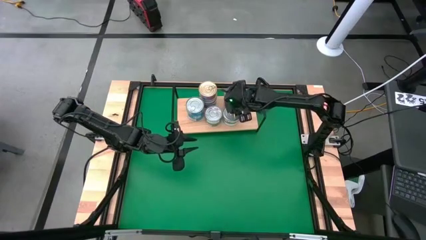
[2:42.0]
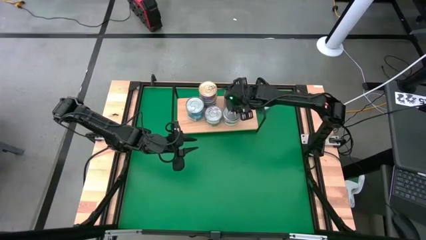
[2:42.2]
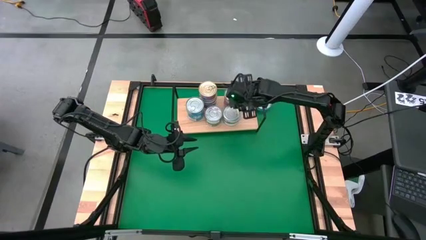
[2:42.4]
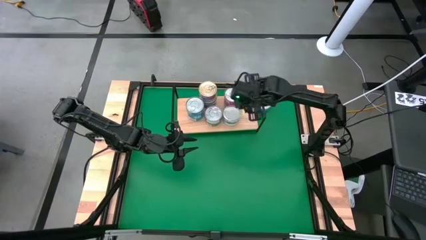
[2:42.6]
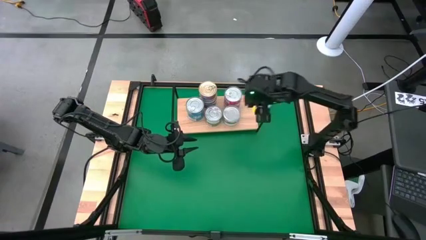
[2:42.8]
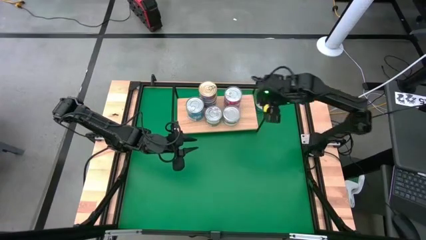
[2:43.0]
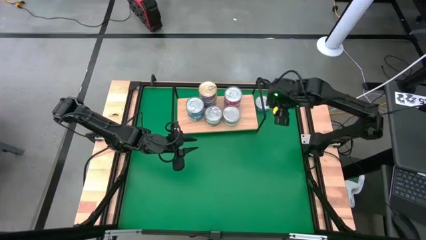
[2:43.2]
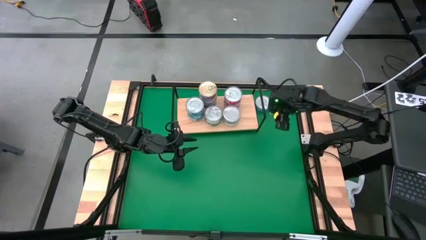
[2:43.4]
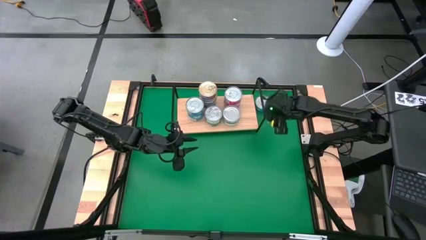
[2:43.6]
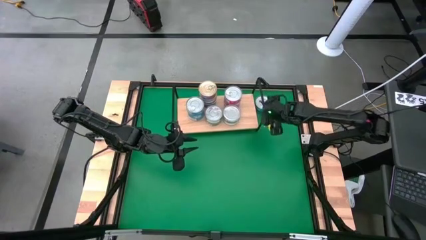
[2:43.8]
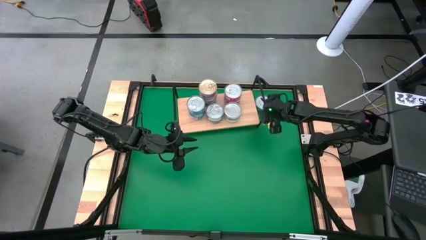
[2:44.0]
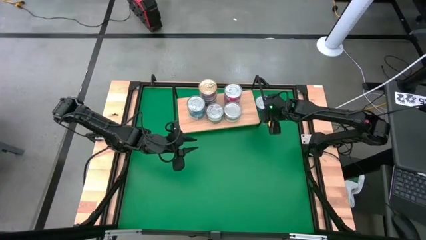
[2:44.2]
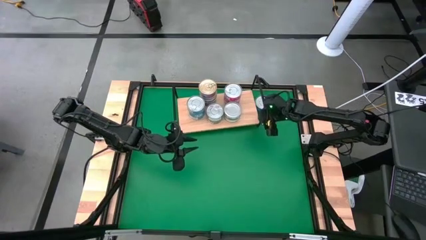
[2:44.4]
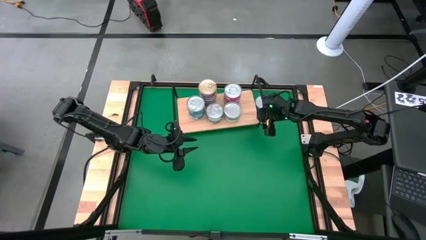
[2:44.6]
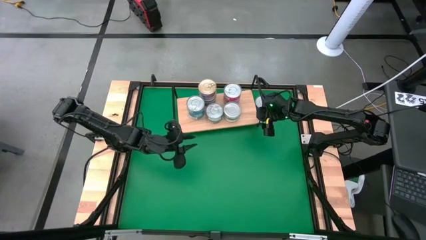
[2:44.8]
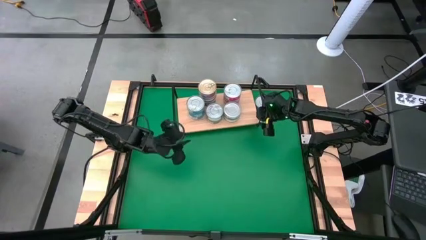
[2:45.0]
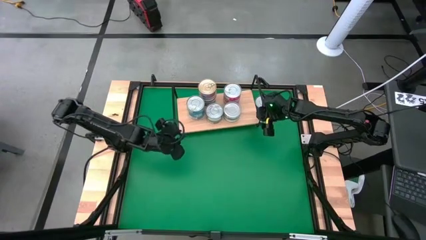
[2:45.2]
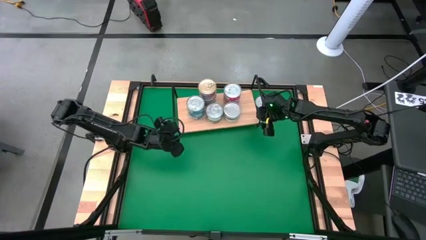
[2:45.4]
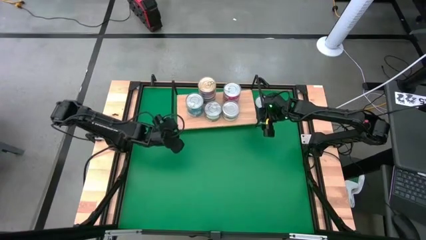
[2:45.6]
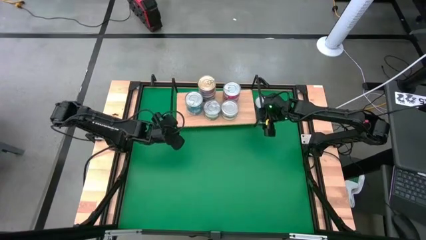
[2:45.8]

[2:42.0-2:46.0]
Task: Stack canned seafood by type on shelf
Adjust the shelf on the table

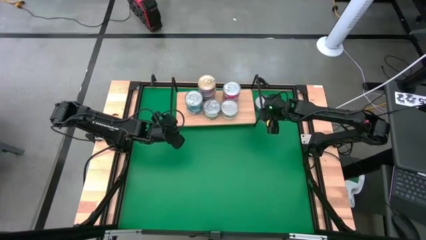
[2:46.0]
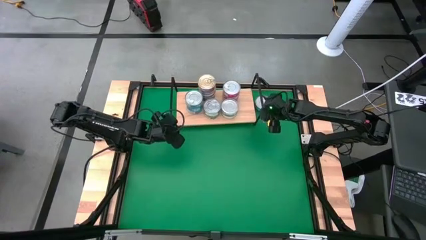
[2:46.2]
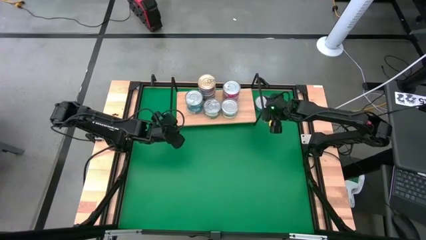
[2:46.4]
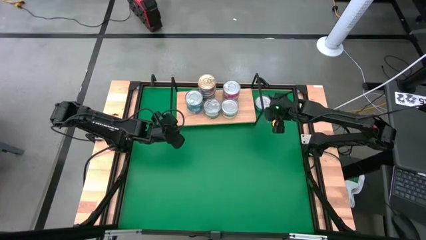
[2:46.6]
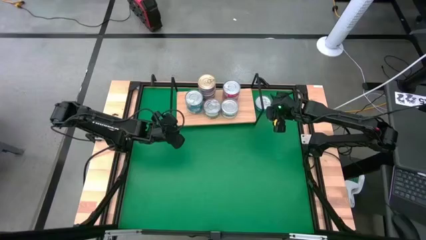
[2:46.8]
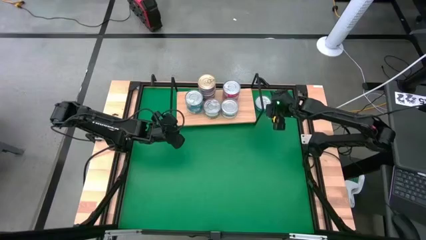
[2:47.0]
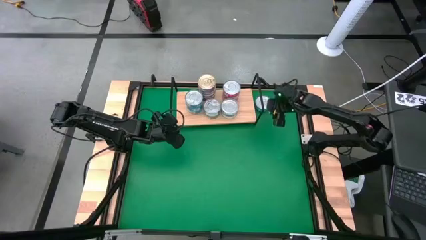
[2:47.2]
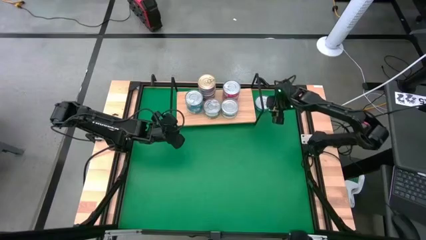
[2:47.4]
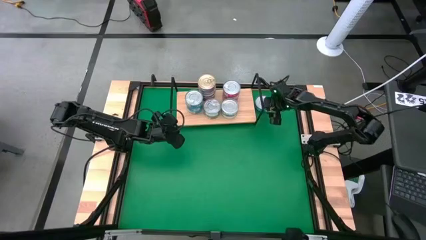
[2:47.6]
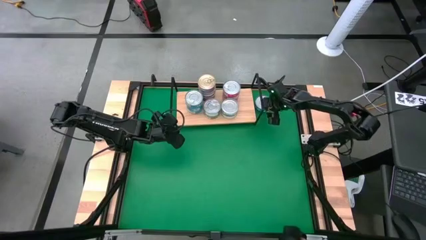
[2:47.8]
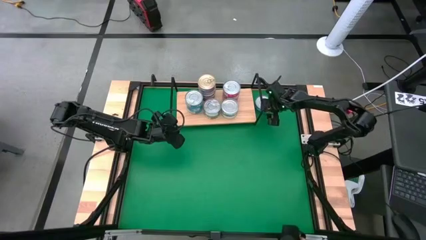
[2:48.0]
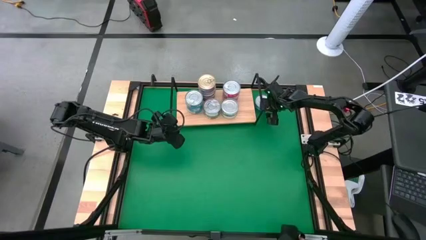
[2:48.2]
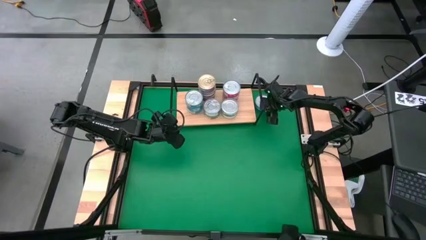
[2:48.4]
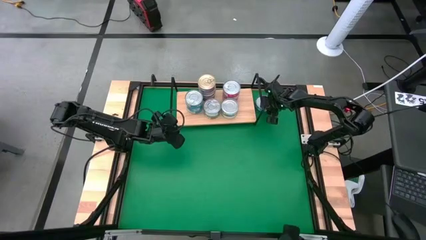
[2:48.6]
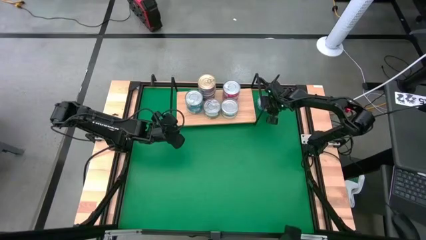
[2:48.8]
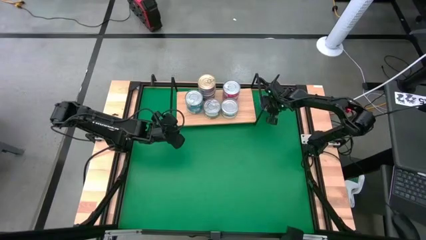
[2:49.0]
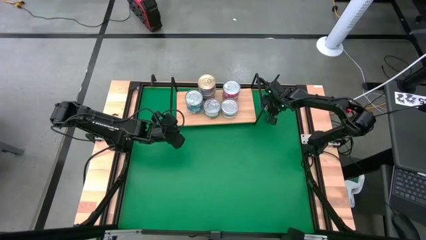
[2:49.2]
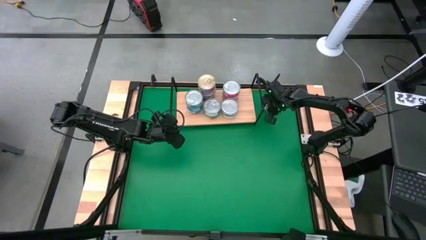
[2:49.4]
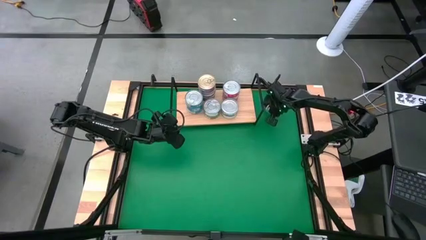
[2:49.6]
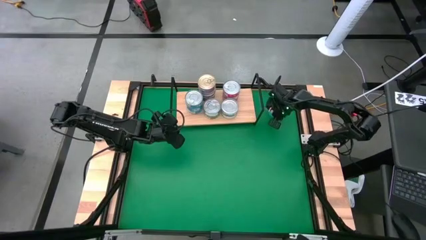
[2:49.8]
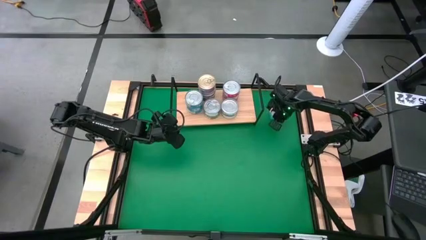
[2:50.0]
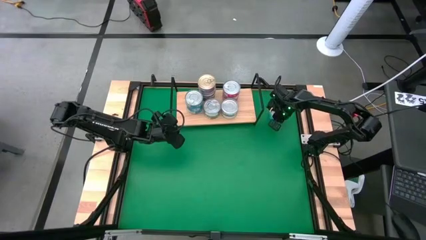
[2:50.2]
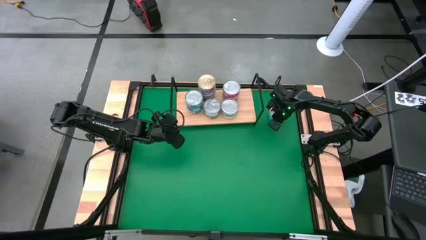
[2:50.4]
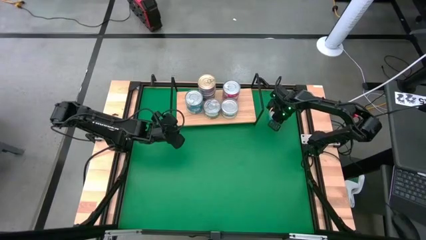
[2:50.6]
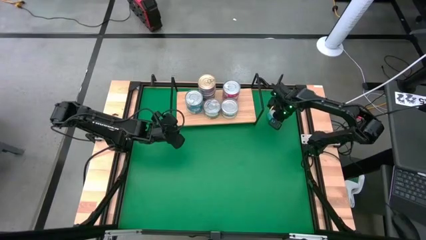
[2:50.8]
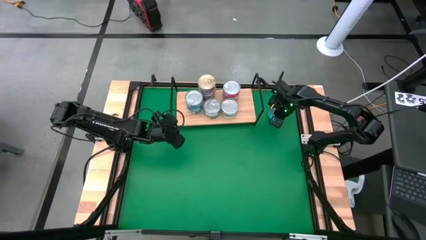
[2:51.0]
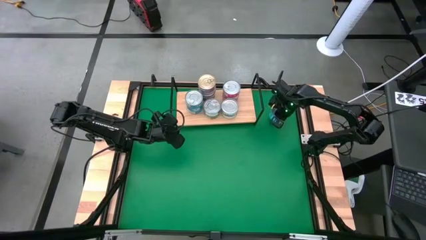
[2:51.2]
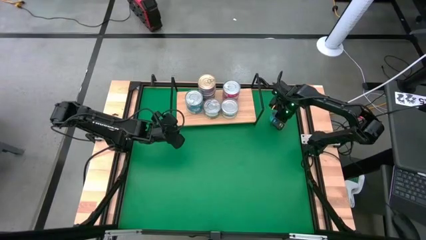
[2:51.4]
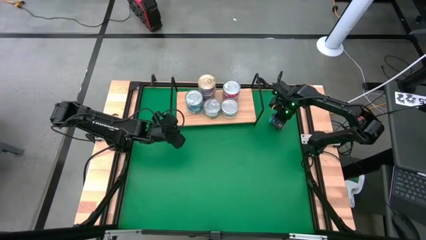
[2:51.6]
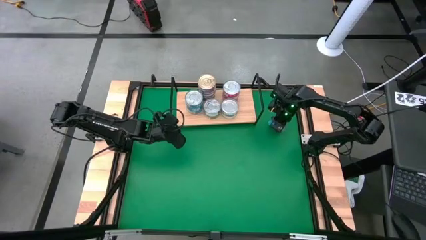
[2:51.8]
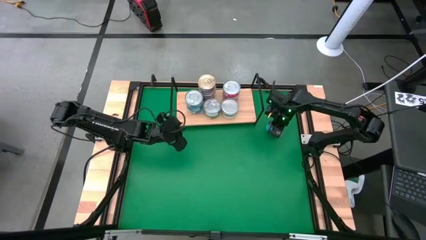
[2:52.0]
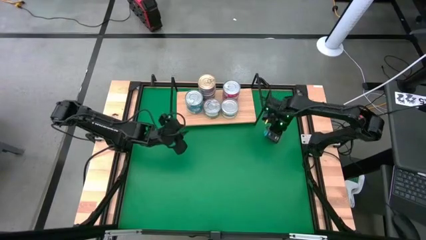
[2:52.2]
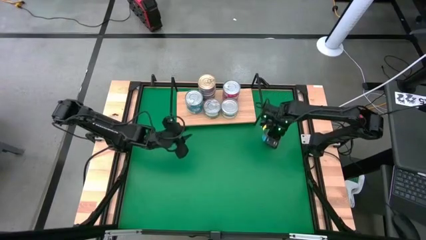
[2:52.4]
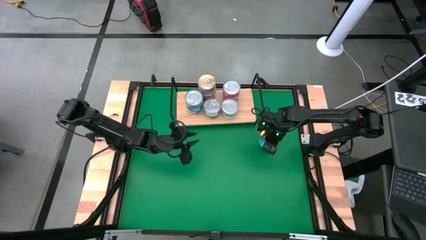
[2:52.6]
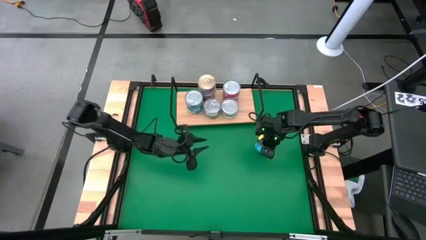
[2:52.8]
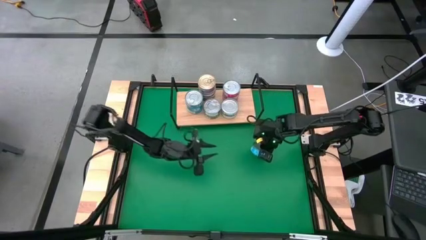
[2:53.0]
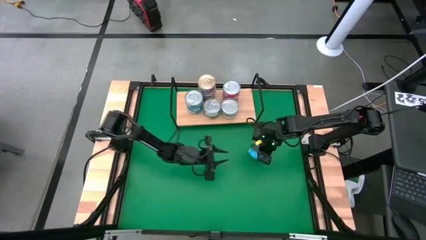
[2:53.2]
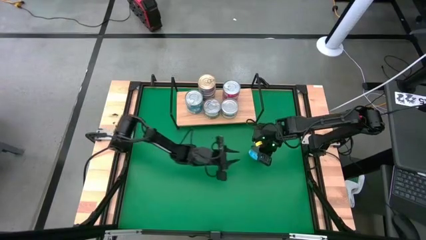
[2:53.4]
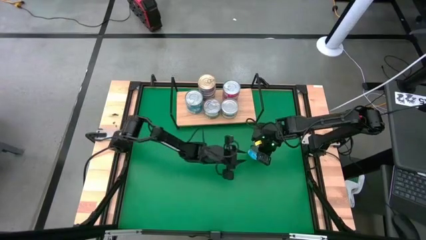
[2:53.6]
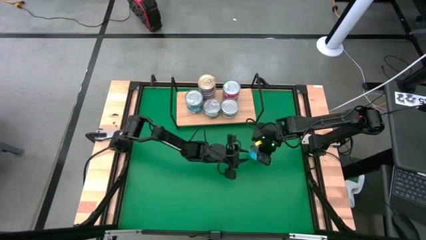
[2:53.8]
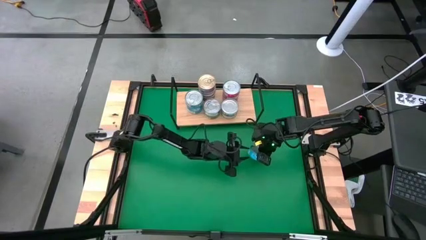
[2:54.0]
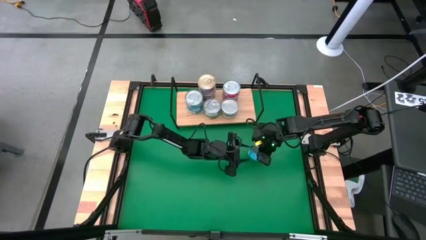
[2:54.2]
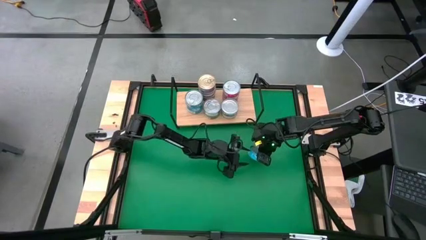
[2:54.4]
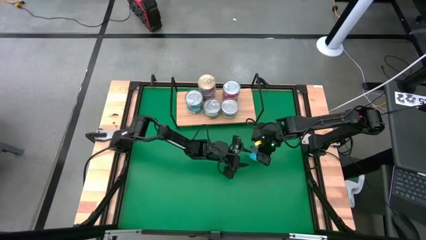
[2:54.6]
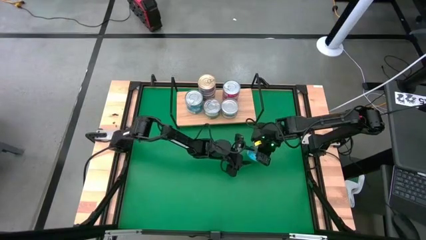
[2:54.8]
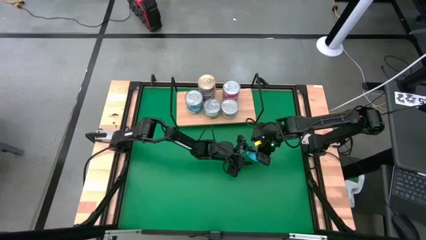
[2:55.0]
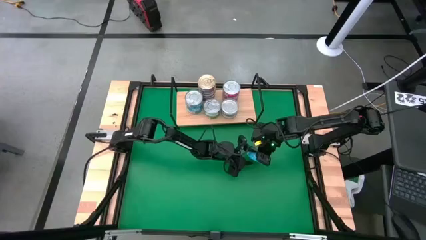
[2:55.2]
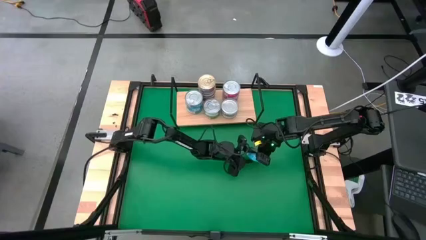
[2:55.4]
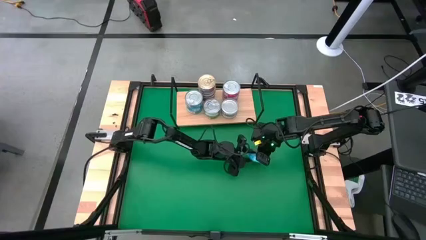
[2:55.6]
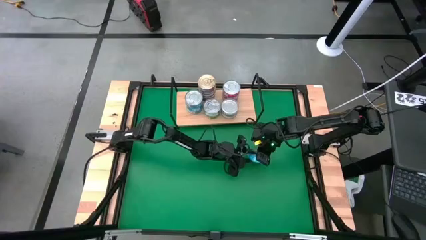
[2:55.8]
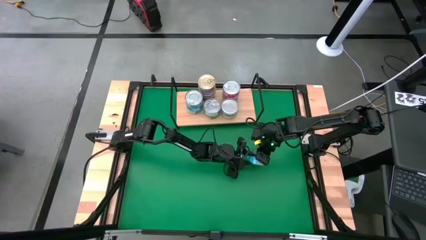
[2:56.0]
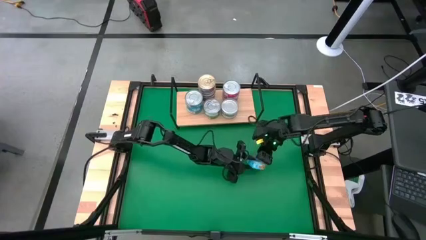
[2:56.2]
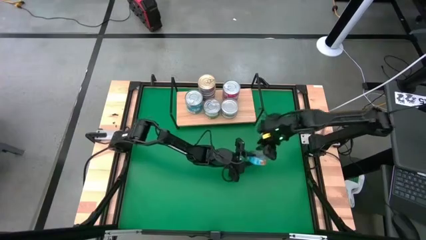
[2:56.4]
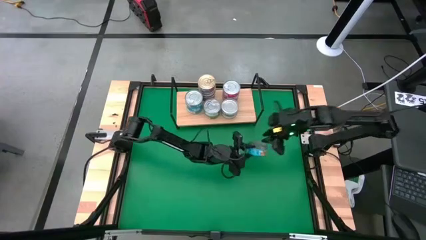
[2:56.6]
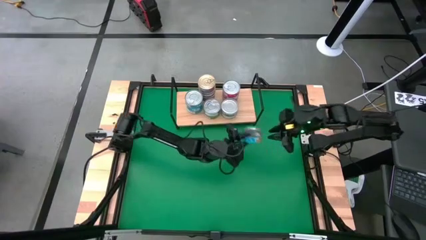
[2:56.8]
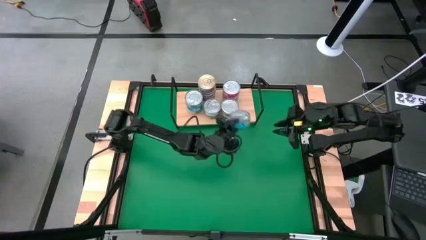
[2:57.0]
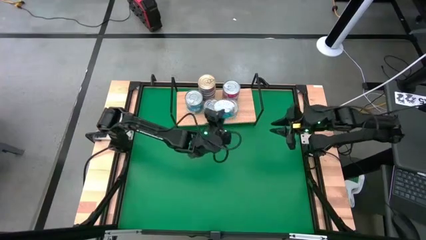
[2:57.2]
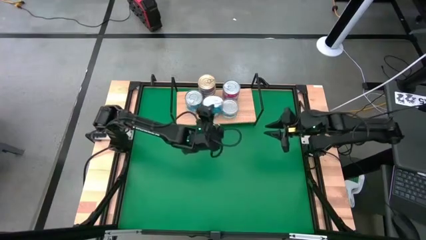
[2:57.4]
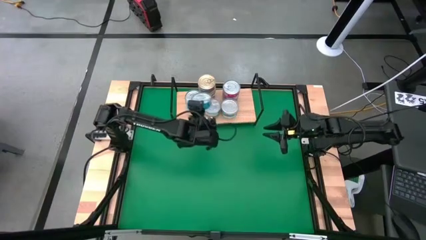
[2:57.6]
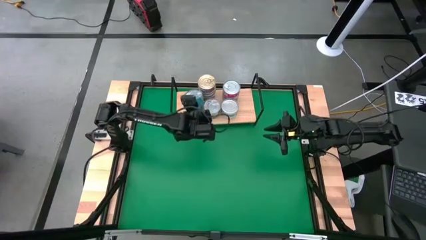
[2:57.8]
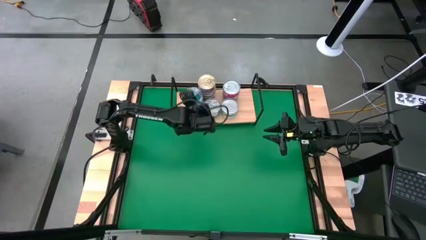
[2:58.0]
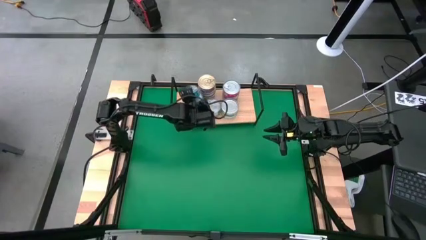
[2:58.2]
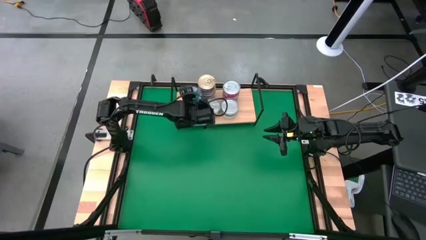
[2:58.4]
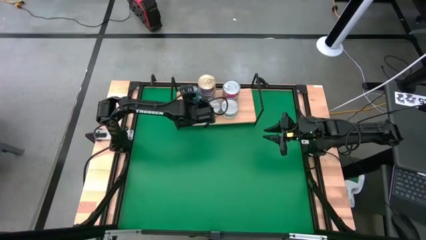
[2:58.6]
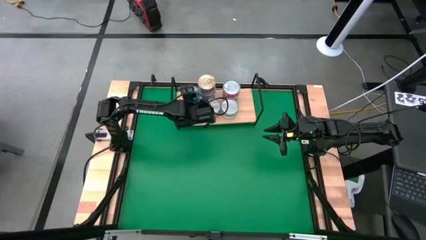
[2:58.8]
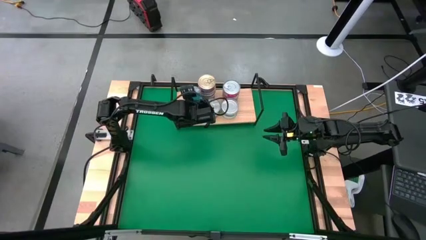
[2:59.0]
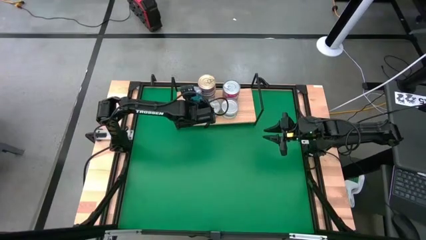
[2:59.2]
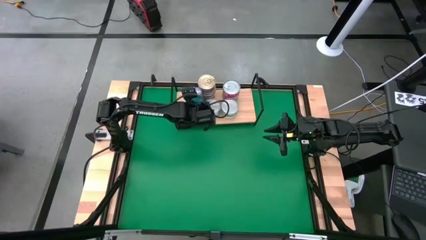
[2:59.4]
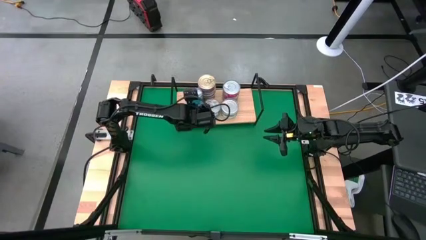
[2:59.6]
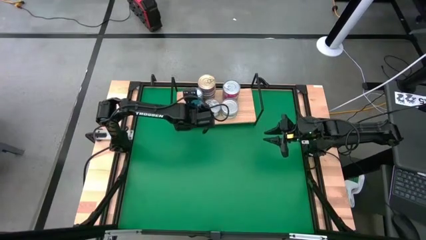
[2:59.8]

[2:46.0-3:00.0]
Stack the yellow blue tuna can on top of the yellow blue tuna can on the shelf
